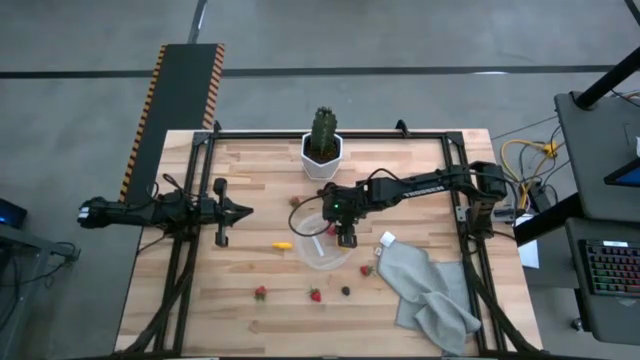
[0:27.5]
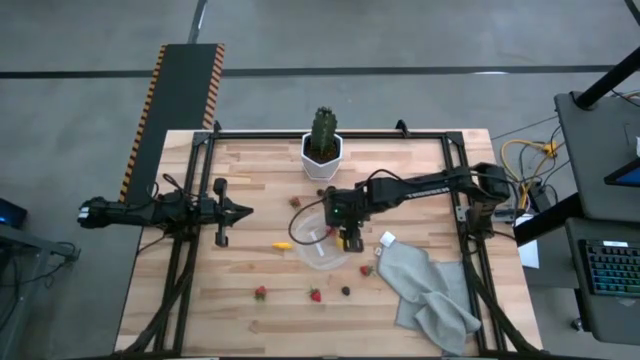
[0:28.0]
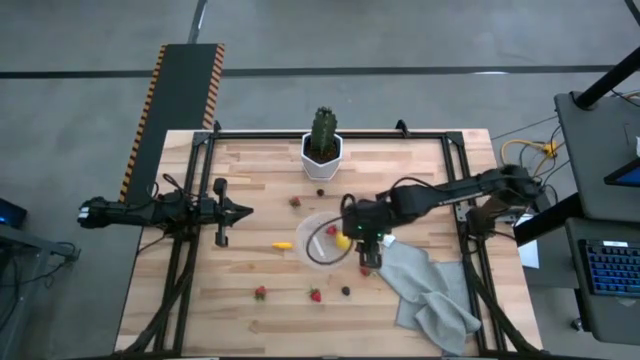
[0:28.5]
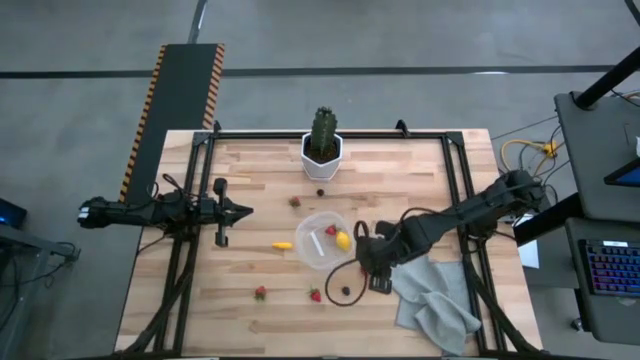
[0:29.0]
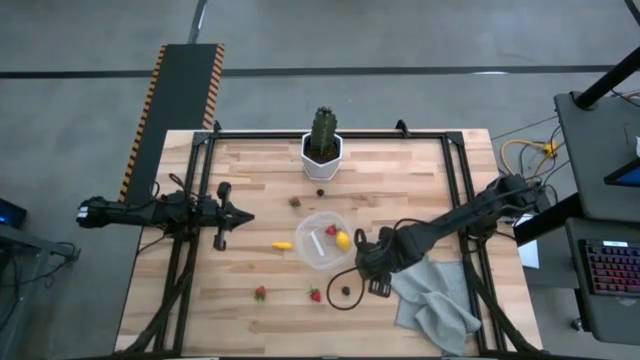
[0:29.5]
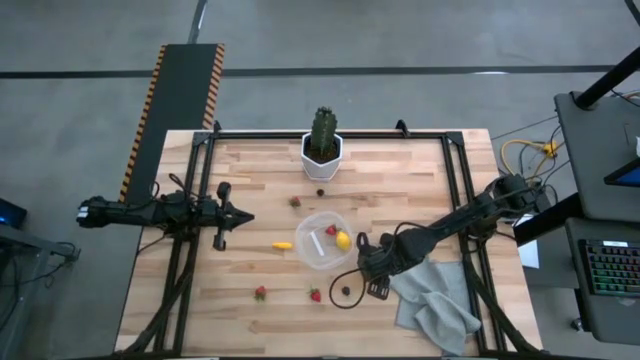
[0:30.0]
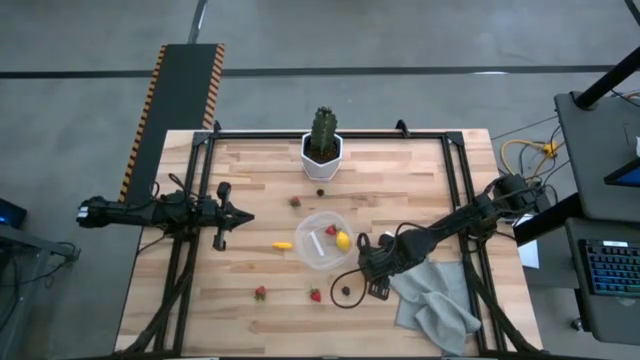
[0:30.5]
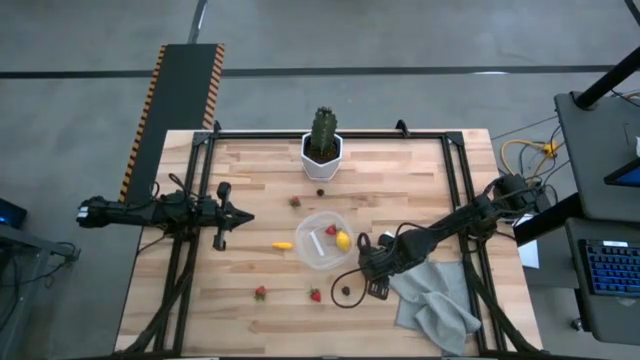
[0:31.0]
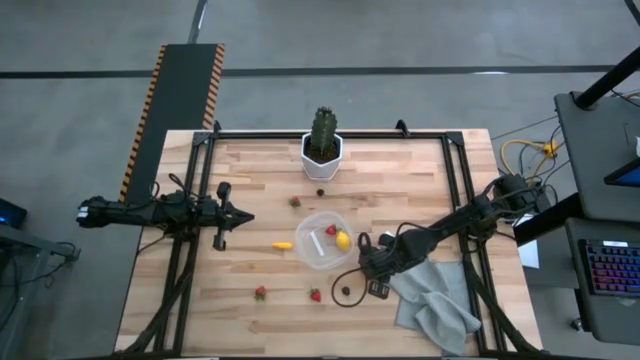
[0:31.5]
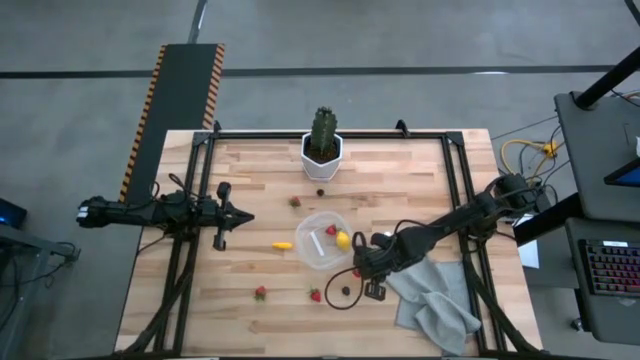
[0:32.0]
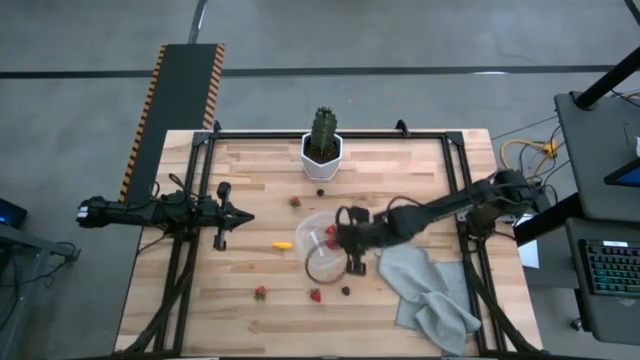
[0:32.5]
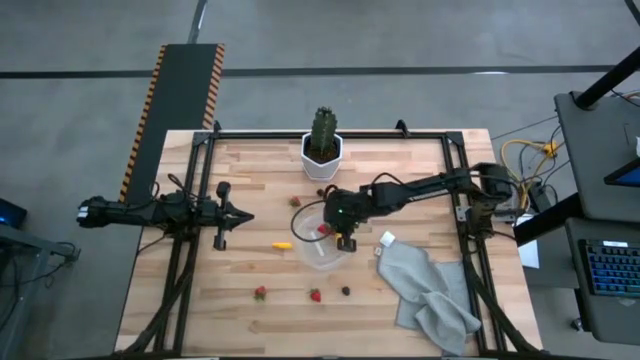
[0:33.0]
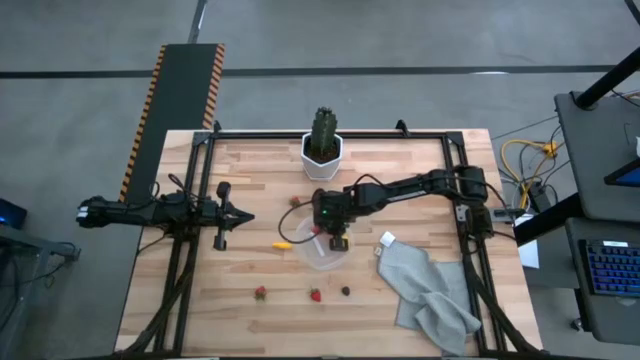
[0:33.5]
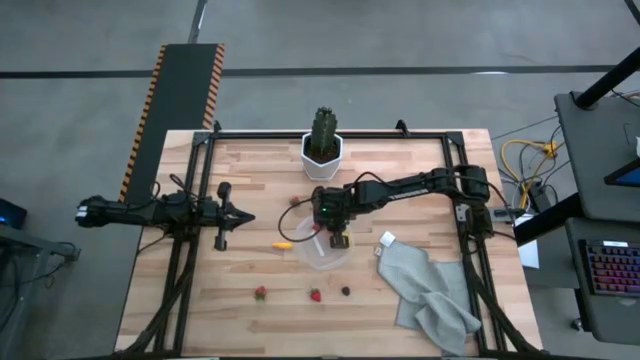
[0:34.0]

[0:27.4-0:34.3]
Task: Pick and placing Produce into tupperware
Put the red strawberry into the transparent container

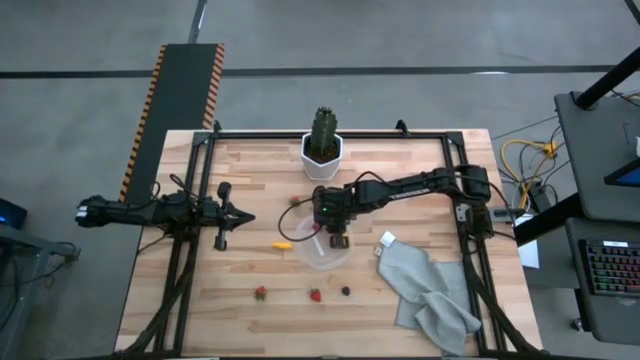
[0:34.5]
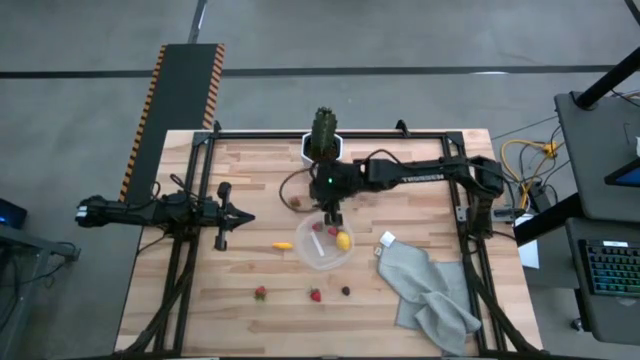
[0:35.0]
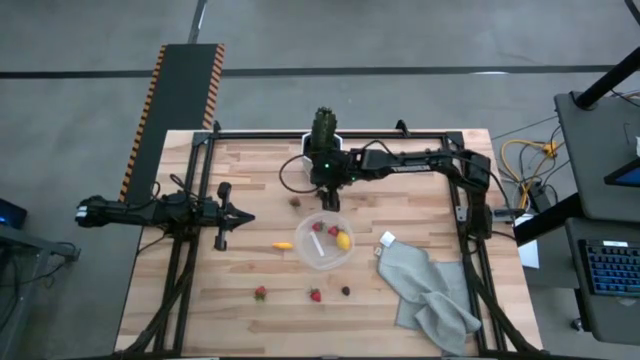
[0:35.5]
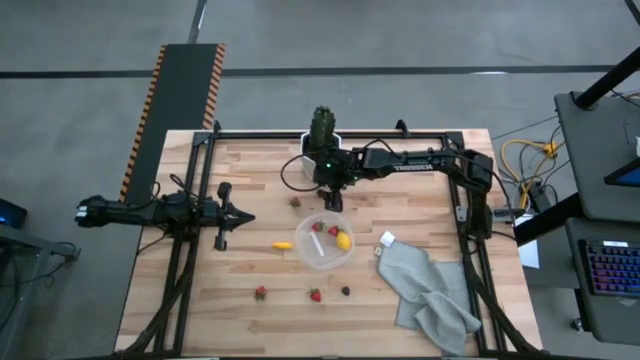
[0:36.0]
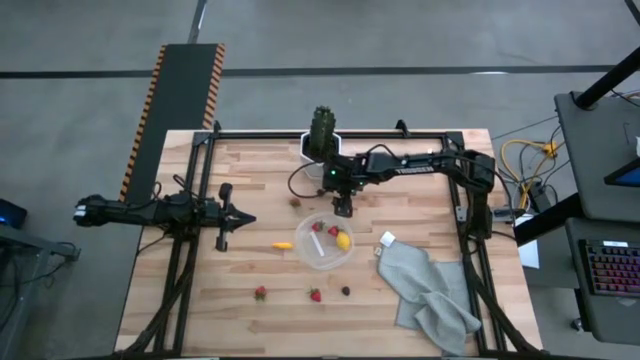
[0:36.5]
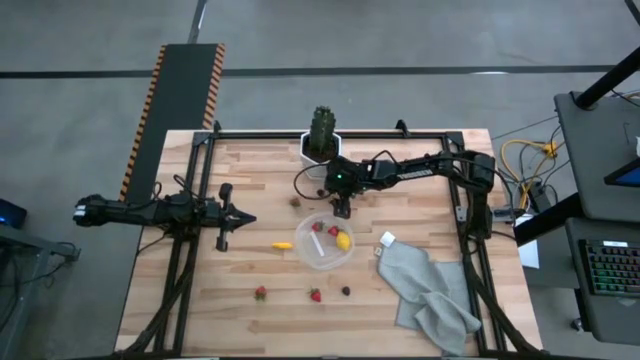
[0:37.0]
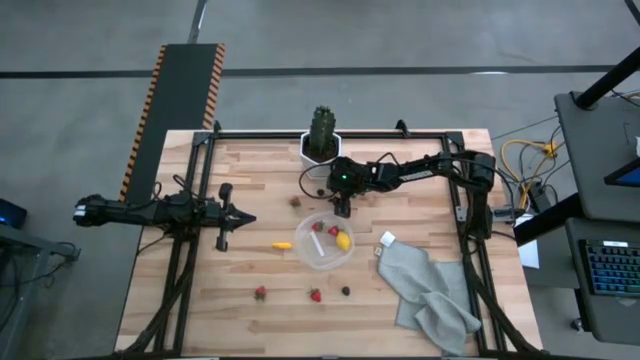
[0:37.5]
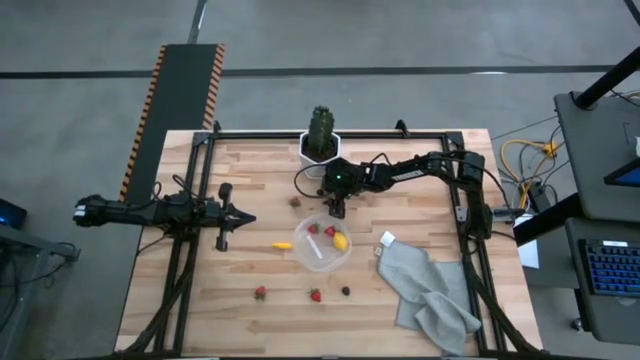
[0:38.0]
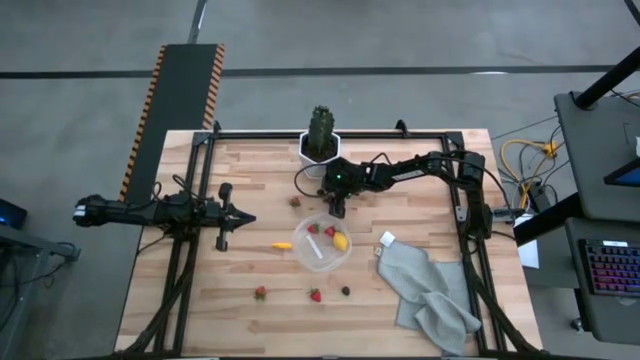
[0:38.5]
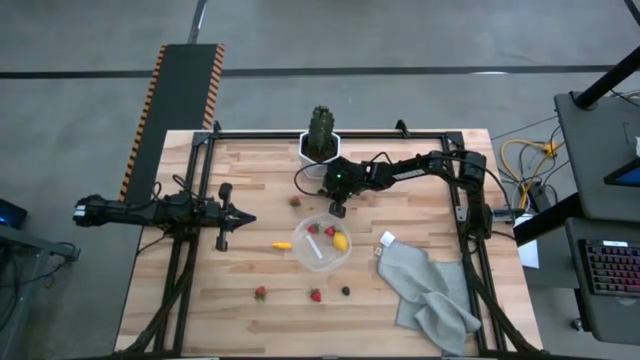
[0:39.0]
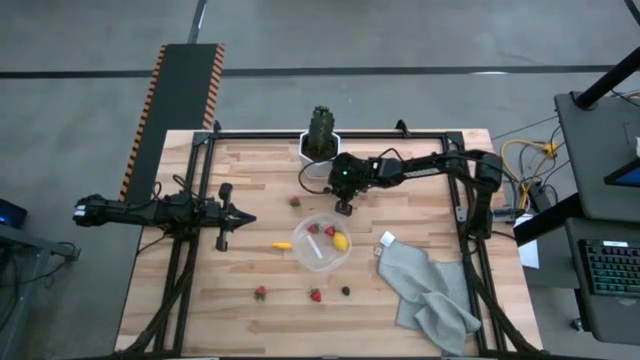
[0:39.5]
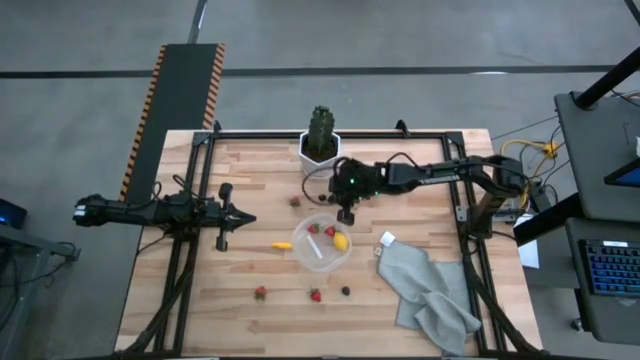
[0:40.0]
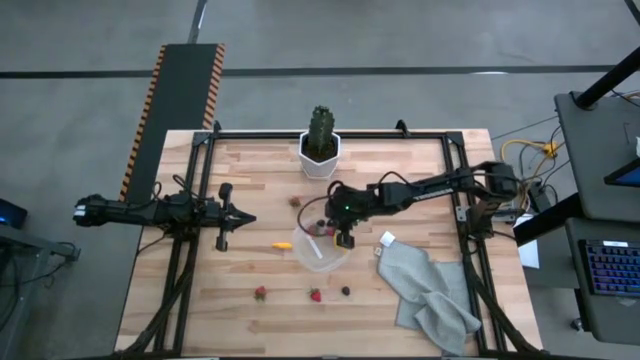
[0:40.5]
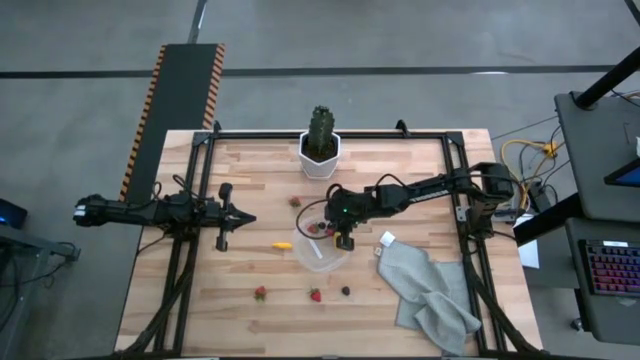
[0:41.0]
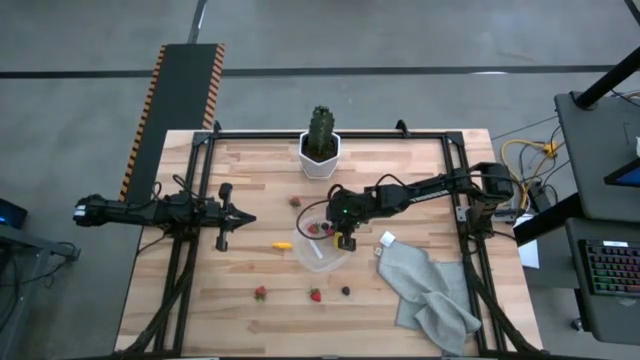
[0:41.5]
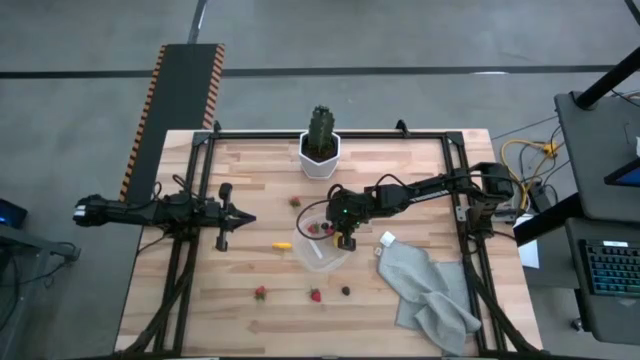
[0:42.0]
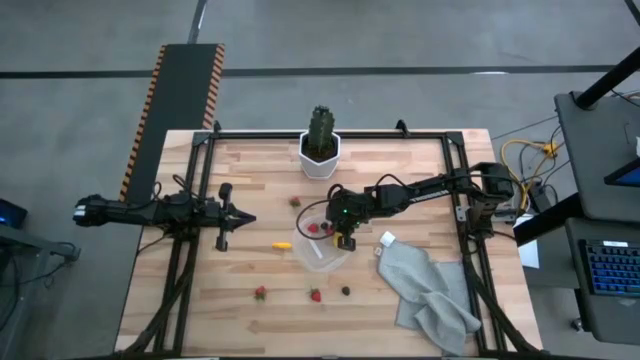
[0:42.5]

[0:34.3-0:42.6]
Put the black cherry into the transparent container

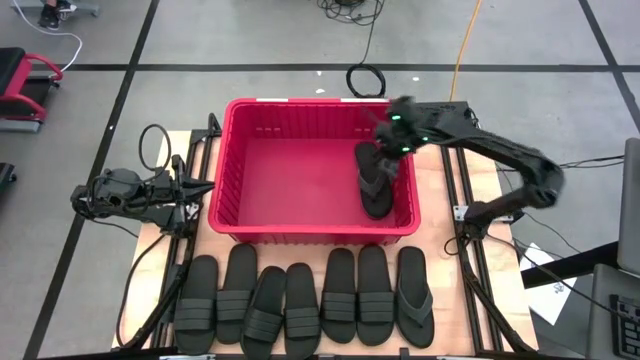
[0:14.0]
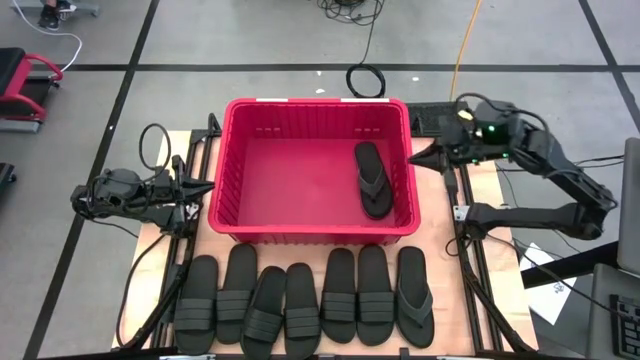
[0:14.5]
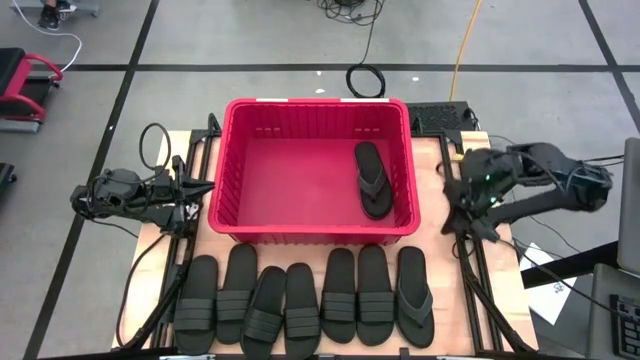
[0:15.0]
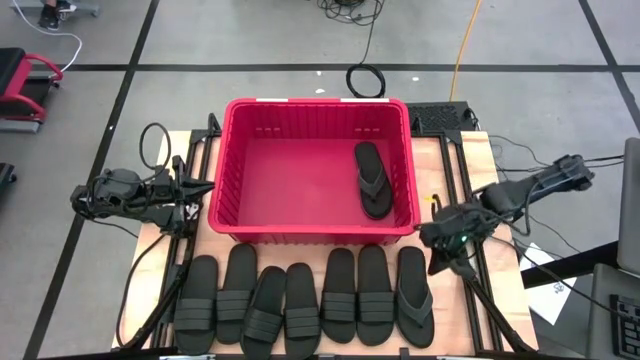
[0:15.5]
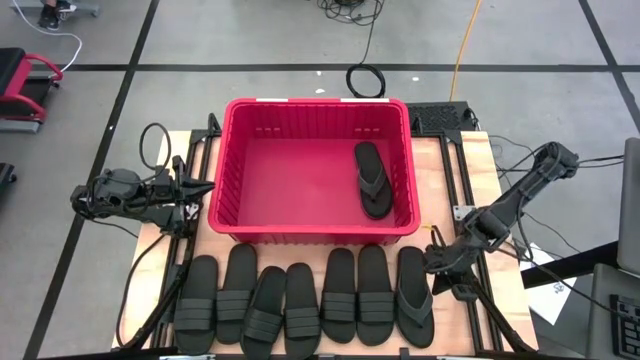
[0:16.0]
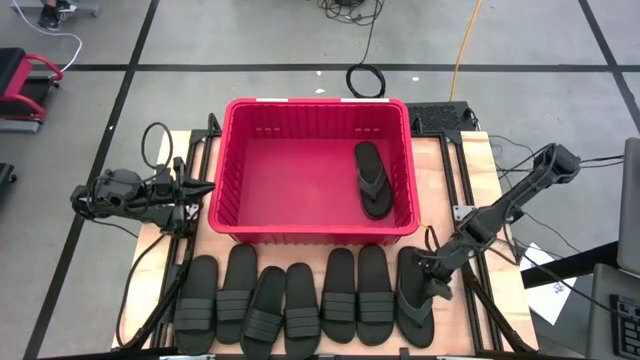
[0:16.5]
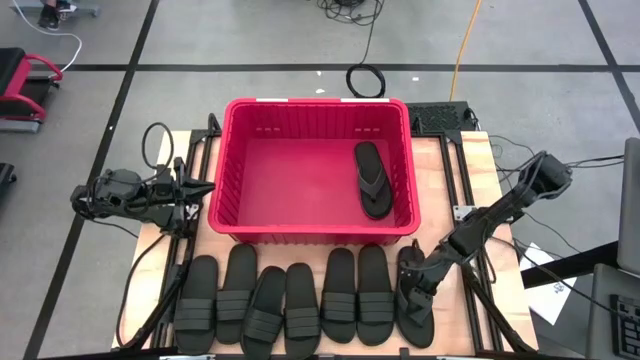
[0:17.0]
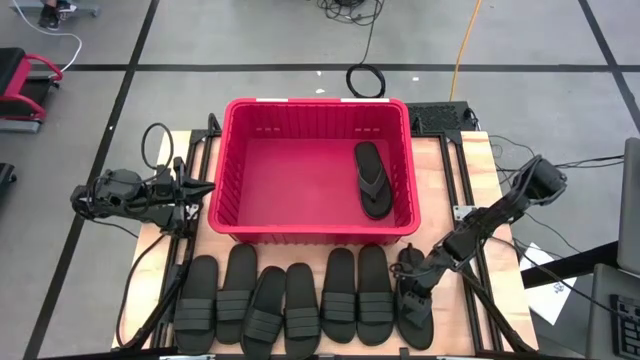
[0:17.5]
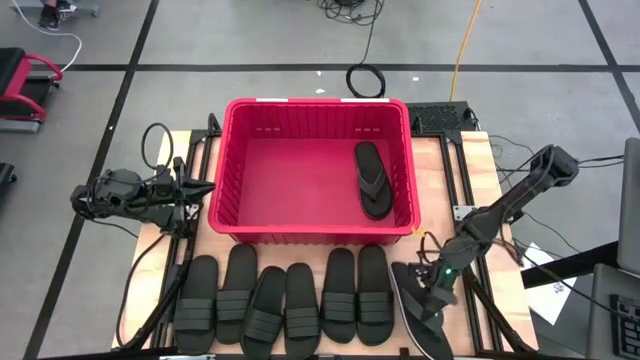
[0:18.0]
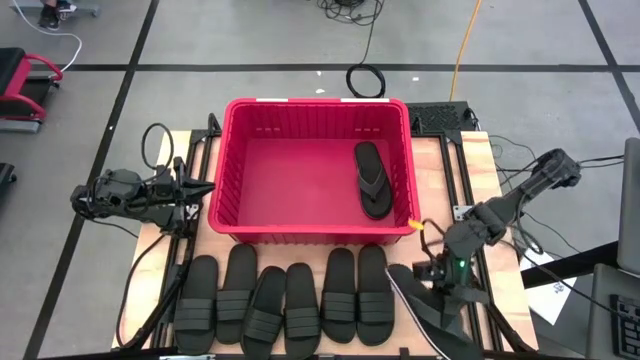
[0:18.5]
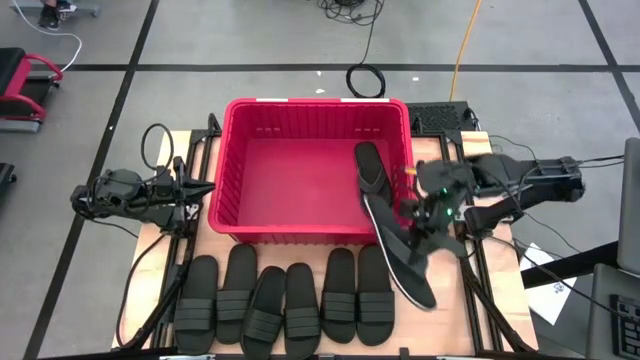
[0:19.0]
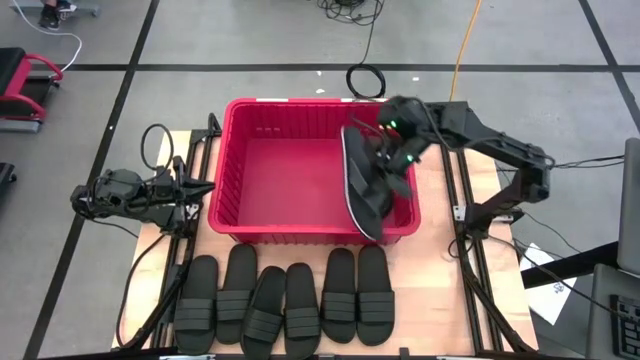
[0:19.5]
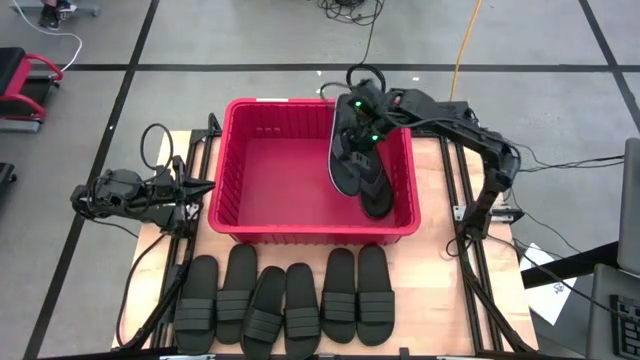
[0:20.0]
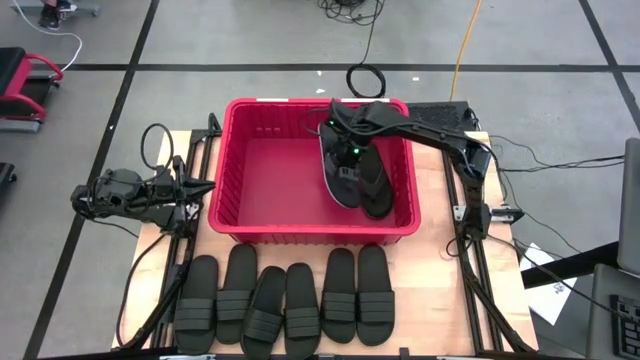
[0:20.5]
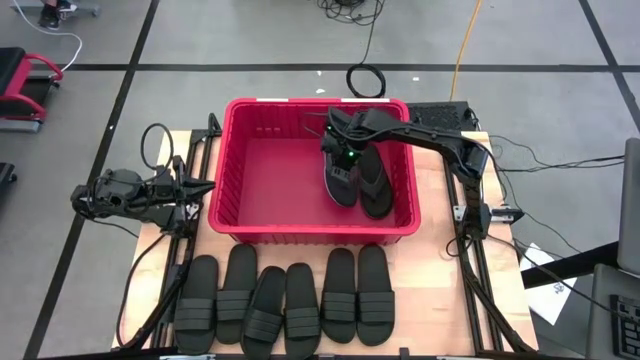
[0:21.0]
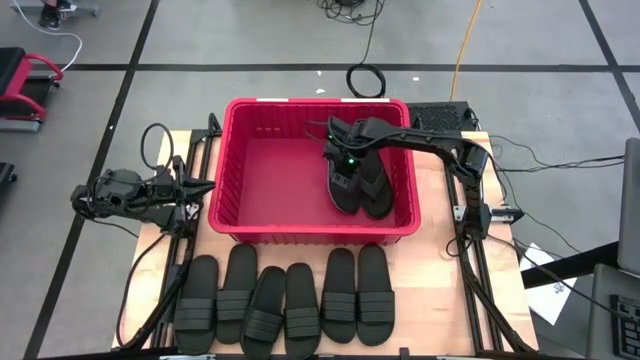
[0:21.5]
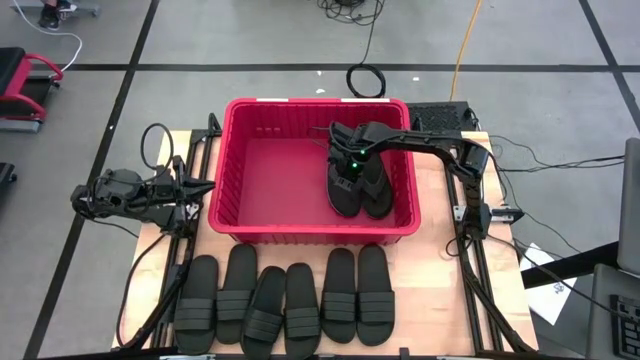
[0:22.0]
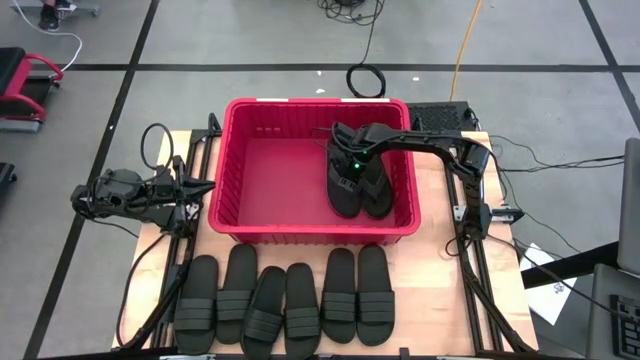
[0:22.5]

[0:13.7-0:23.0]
Task: Pick and place slides into bin
Put the flip flop into the red bin
